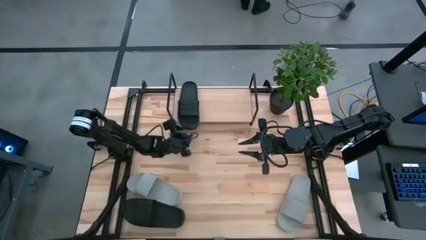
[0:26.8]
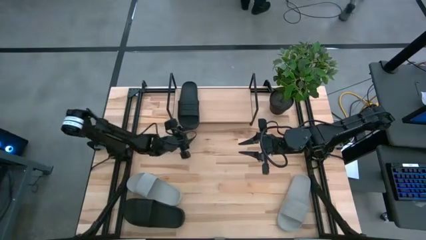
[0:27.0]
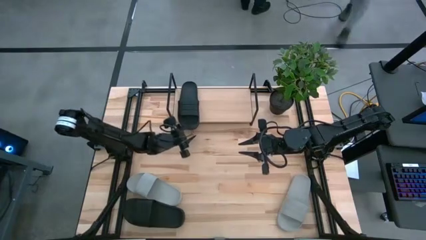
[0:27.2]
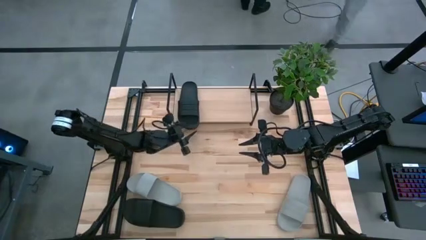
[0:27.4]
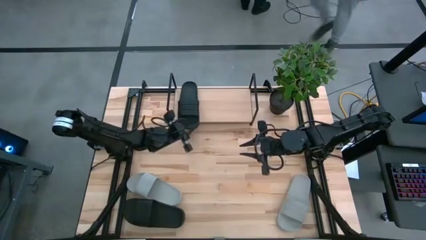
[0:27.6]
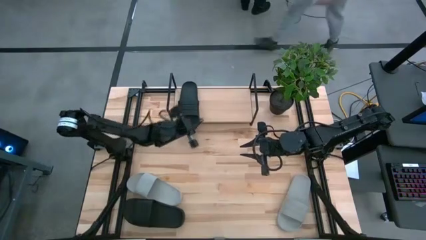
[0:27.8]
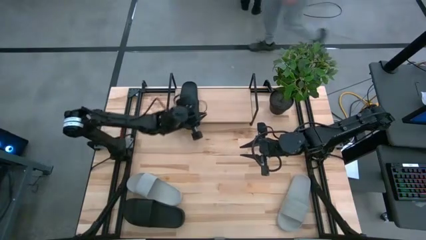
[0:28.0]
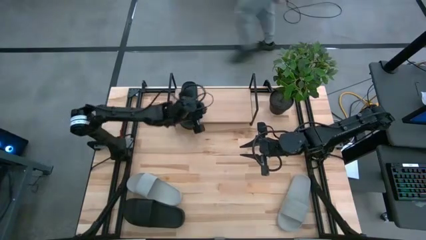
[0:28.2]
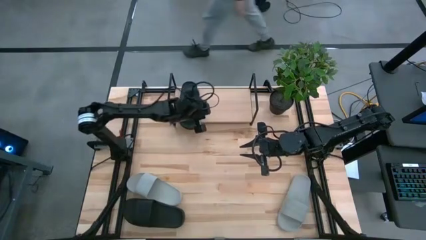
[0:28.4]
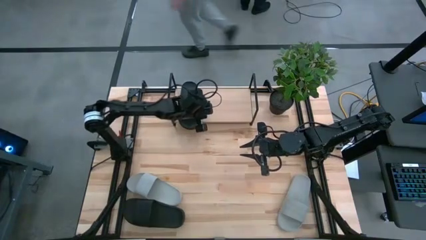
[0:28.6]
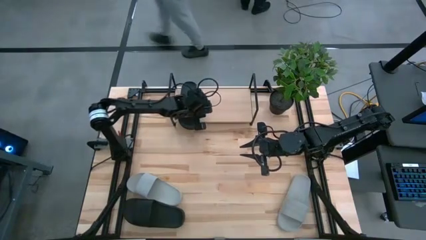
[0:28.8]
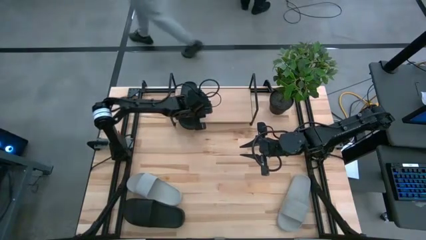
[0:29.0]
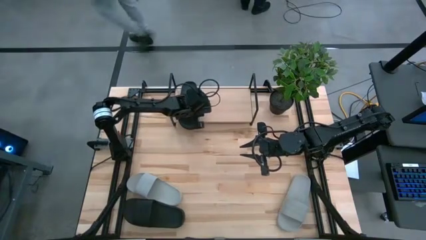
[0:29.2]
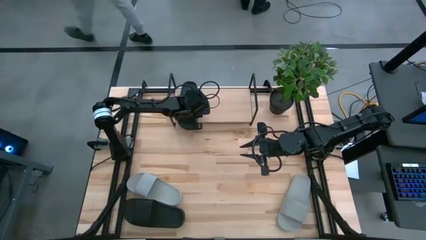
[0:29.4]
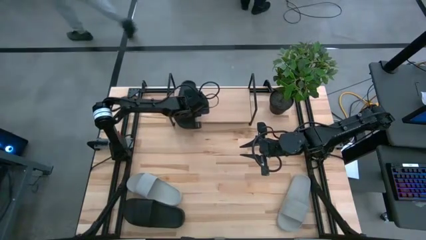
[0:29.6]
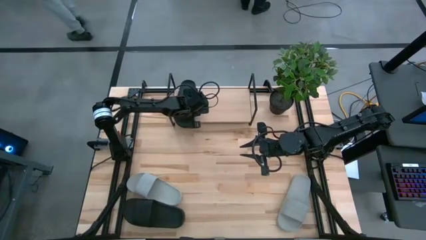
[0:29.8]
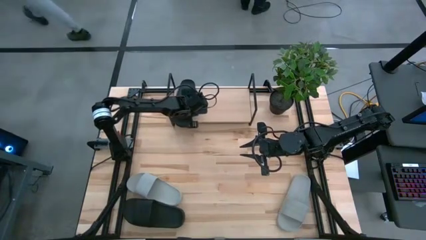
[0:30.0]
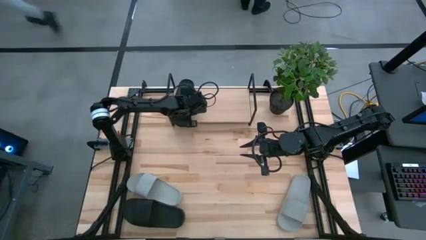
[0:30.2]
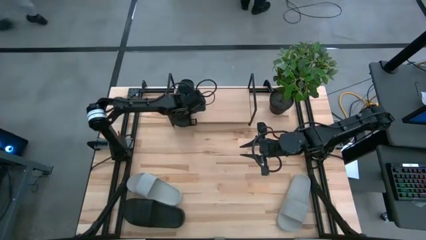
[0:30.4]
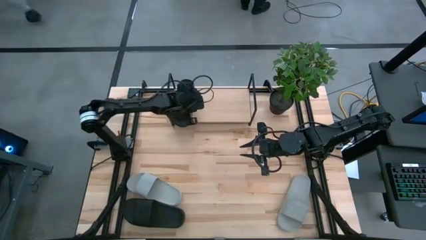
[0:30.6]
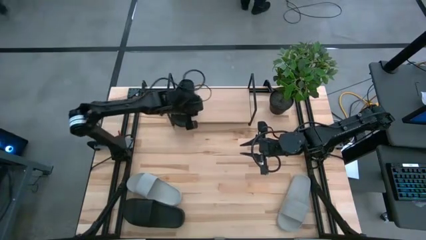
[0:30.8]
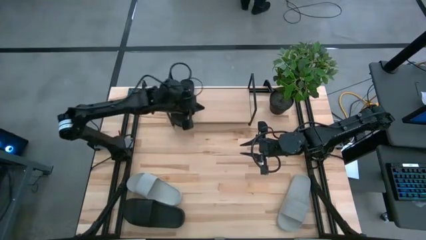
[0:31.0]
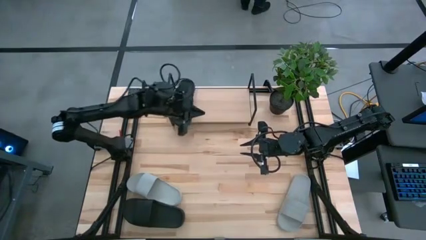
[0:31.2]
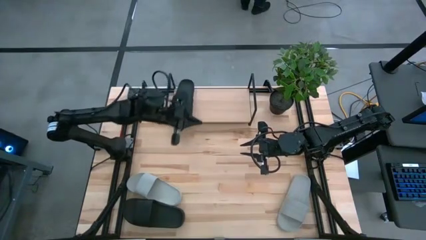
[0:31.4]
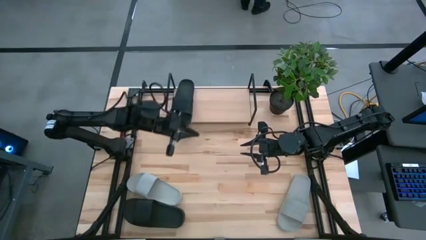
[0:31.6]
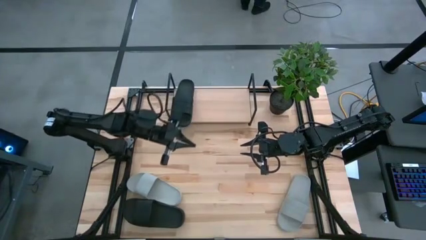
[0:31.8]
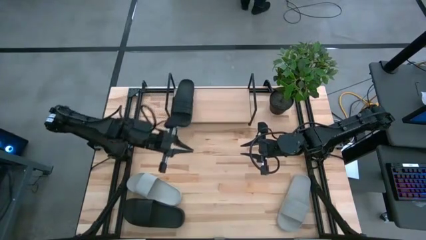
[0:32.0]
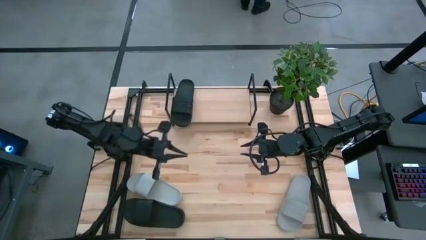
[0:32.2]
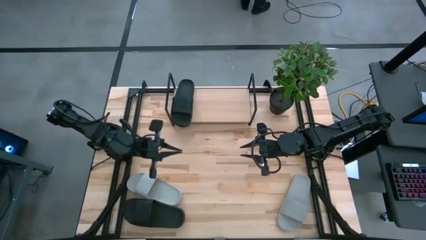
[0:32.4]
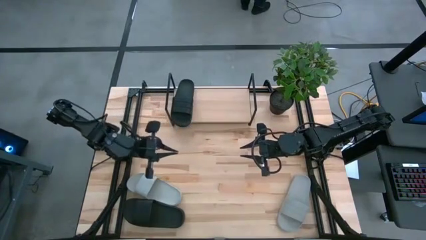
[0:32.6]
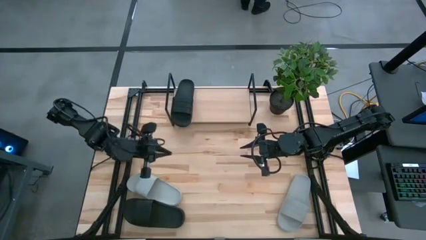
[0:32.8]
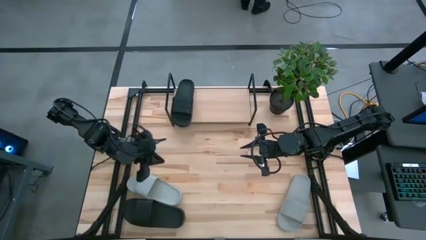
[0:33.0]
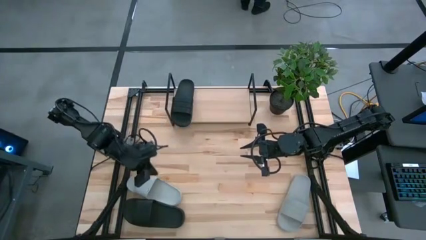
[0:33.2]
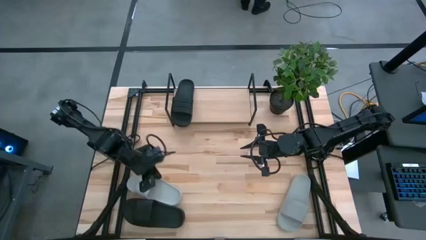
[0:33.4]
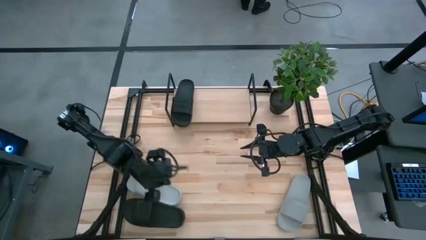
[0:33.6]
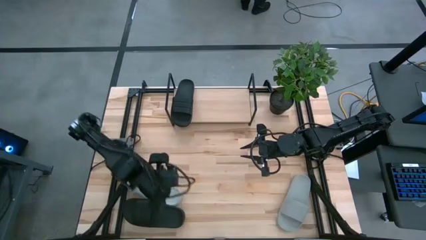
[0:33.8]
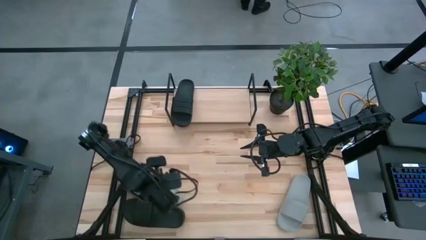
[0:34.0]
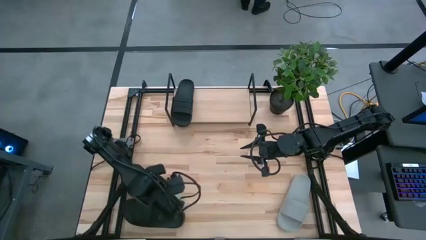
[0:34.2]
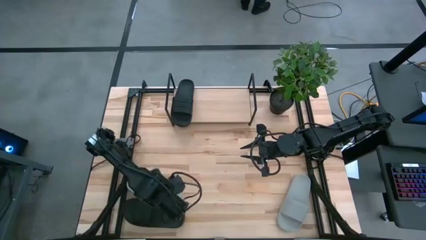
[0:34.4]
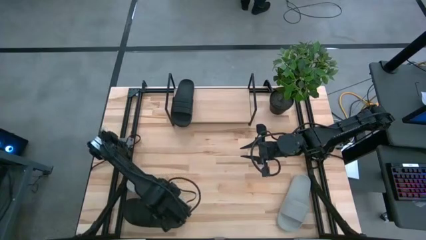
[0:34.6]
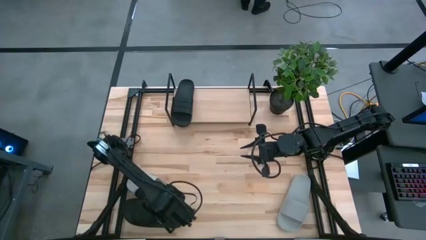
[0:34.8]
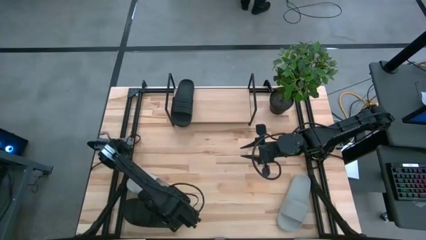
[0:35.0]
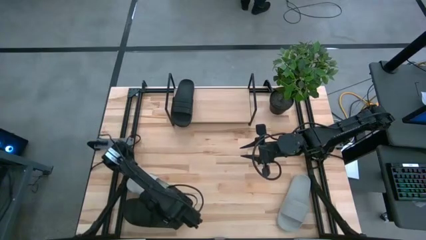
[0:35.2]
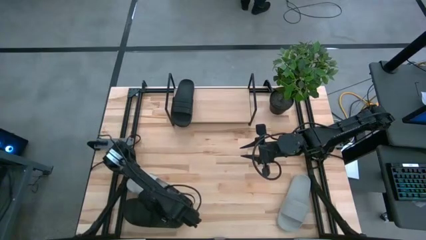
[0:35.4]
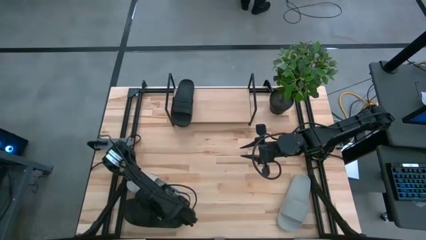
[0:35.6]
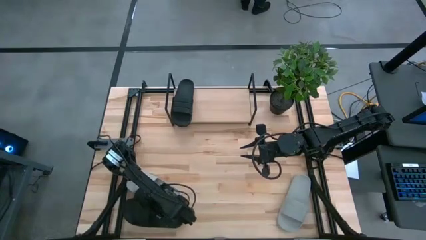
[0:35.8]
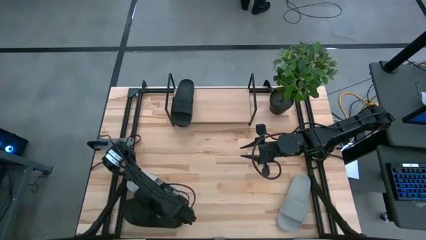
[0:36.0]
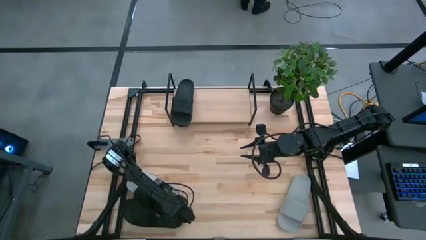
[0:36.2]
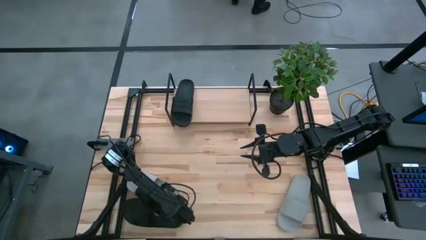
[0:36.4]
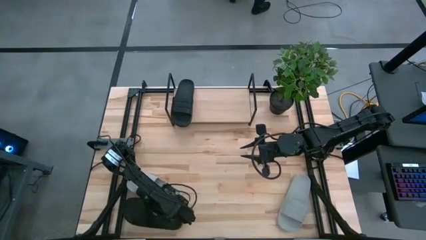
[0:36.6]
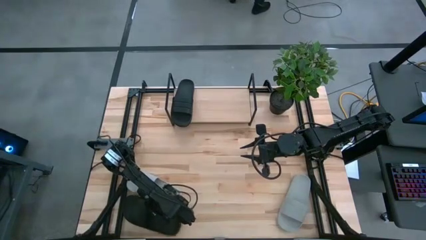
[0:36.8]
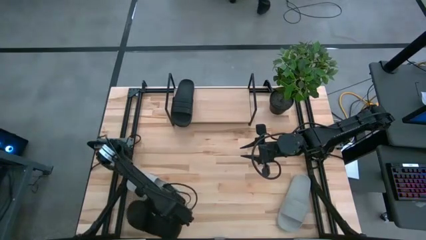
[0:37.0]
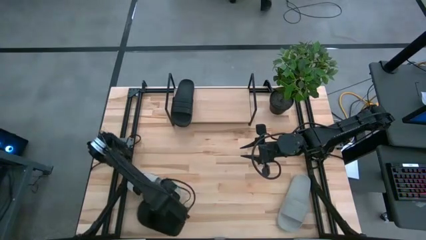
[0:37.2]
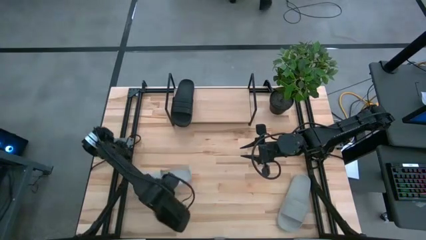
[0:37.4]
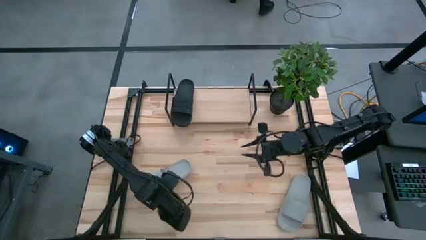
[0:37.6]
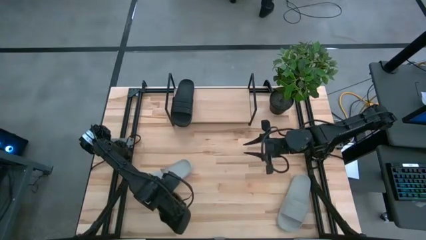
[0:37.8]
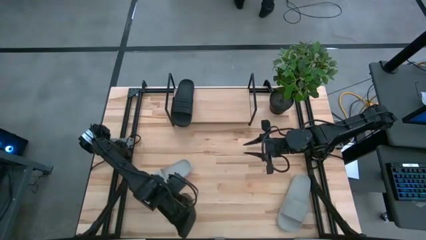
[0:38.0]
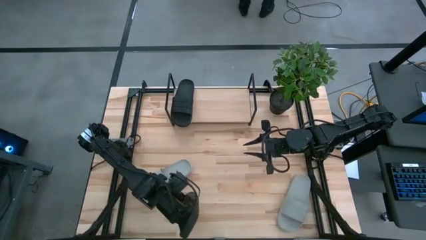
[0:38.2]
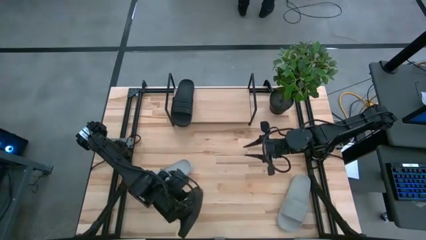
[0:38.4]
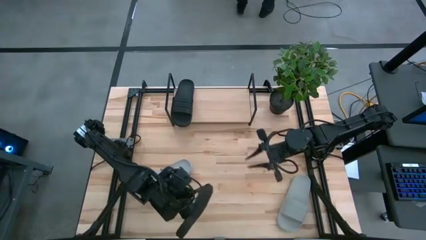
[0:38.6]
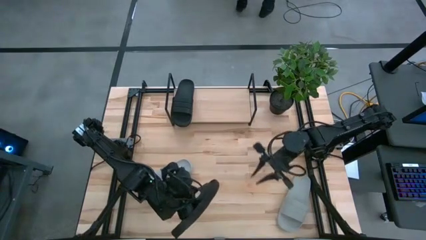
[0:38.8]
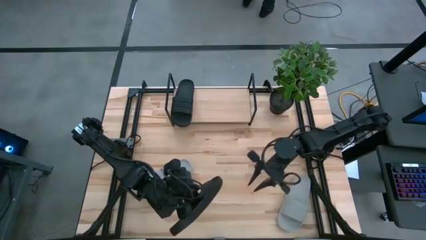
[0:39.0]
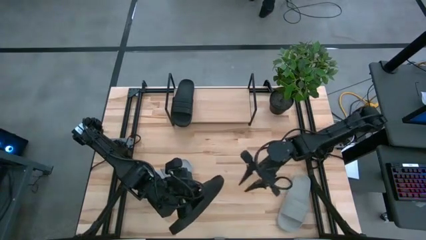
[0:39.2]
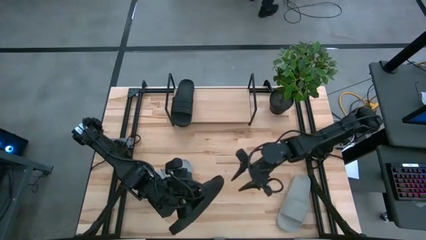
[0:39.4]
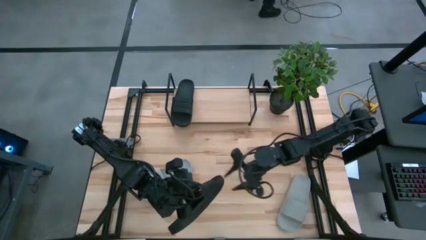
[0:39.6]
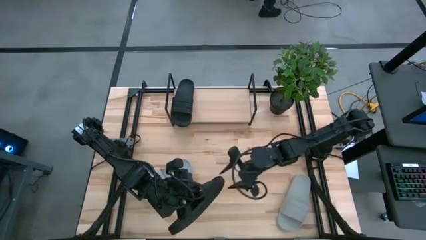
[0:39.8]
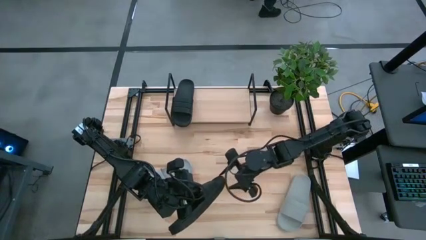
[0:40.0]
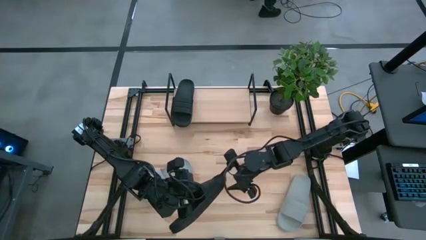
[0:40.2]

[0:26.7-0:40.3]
Task: Pick and place slides into the shelf
Put the black slipper on the shelf

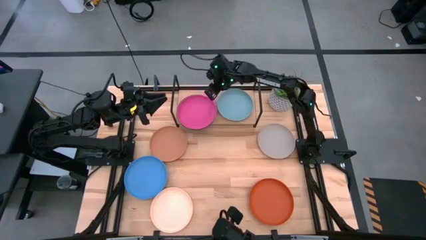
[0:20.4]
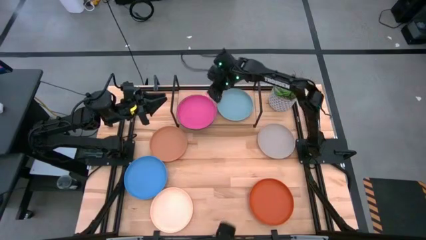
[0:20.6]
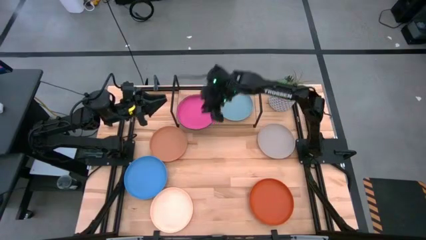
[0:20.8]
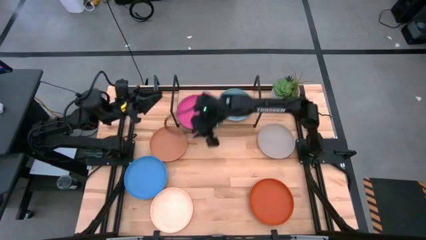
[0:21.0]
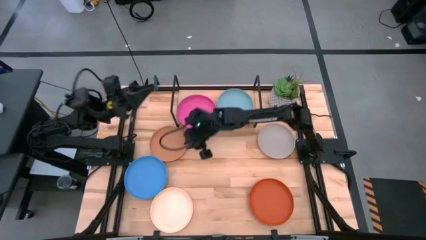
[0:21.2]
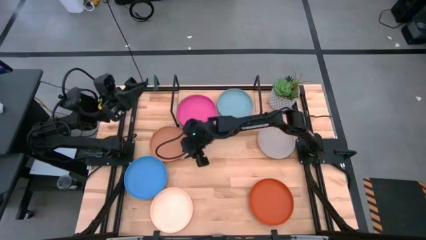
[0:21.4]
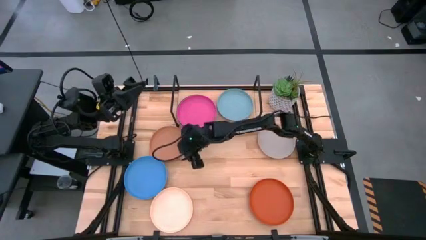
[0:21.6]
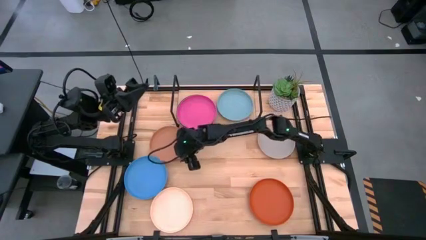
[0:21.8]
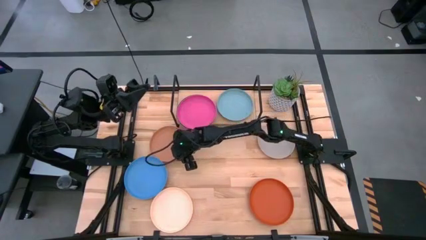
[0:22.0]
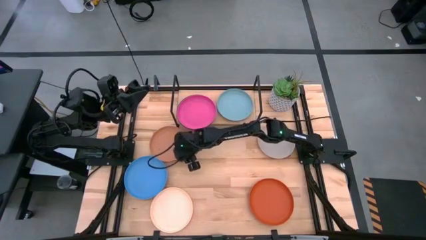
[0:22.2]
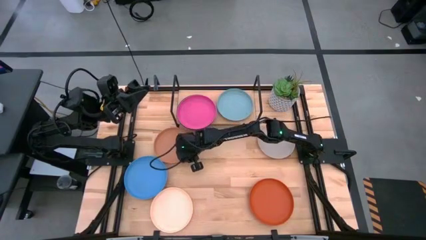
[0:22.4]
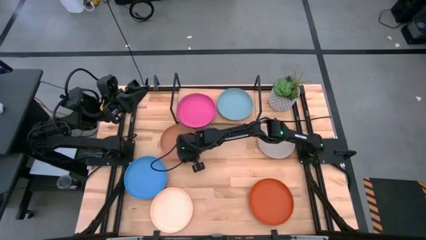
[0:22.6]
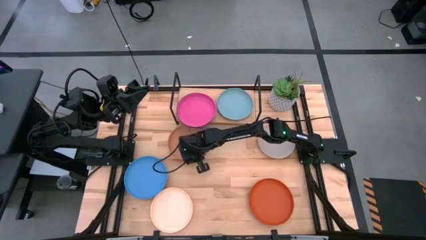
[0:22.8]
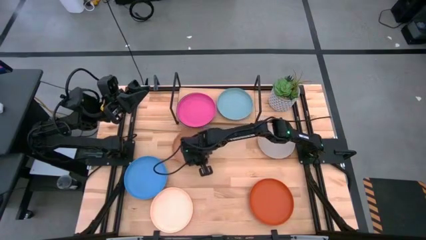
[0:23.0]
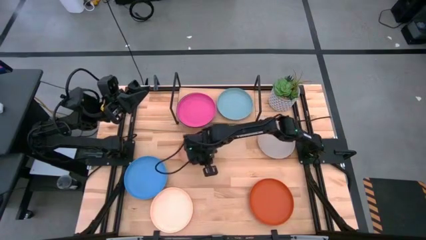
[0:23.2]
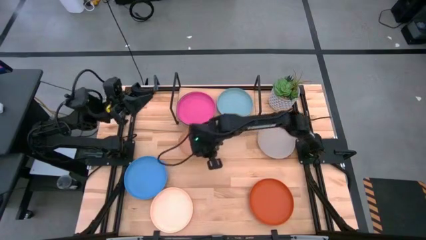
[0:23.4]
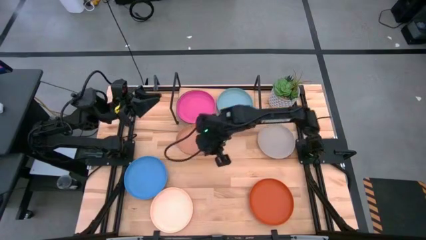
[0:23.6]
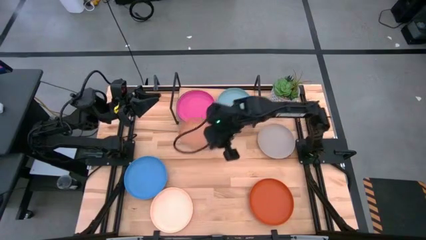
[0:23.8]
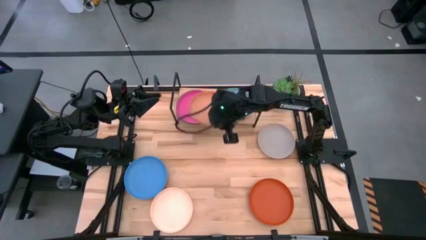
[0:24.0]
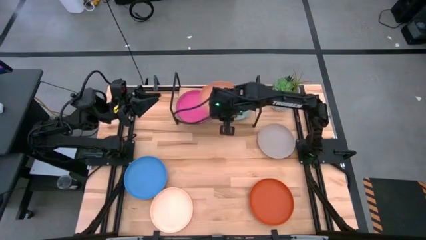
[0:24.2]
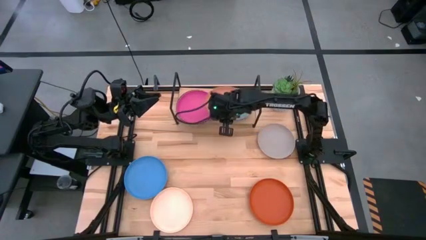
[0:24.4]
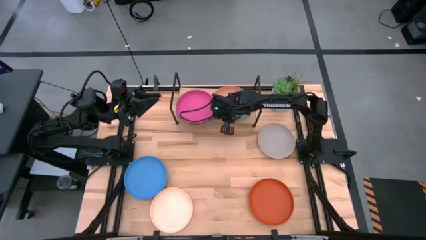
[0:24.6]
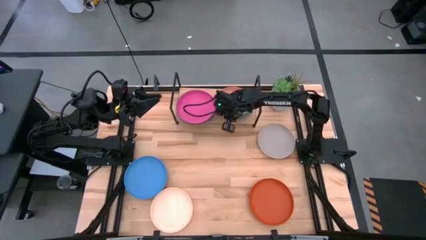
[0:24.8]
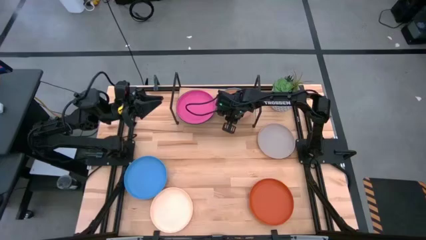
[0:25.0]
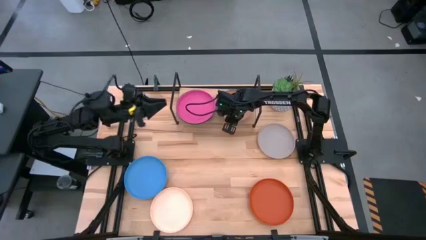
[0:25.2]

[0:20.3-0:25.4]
Task: Place and stack plates onto a shelf
Stack the brown plate on top of the light blue plate on the shelf
